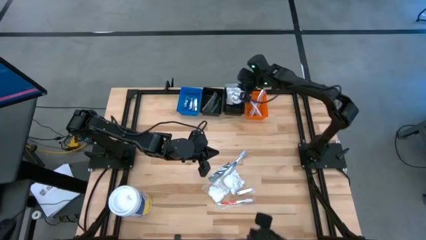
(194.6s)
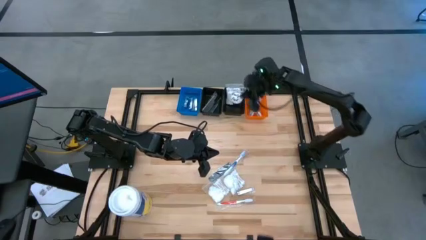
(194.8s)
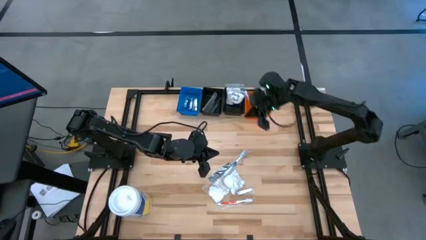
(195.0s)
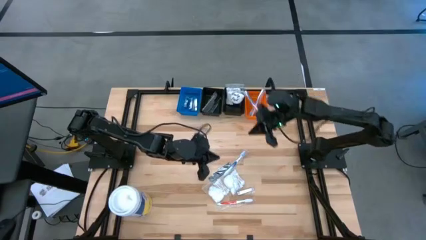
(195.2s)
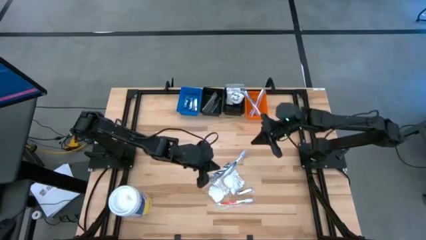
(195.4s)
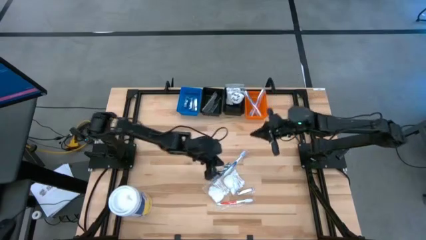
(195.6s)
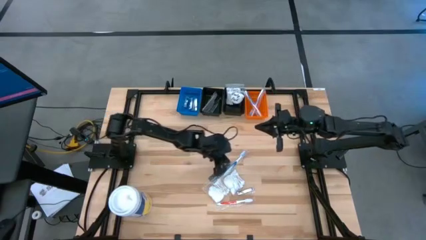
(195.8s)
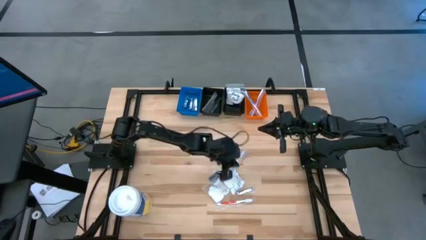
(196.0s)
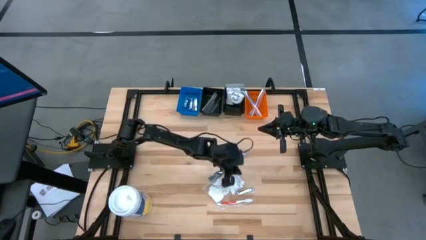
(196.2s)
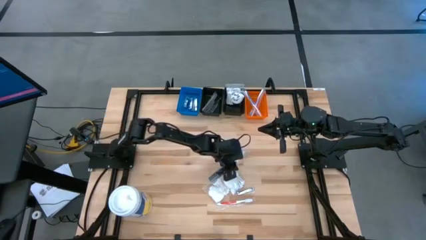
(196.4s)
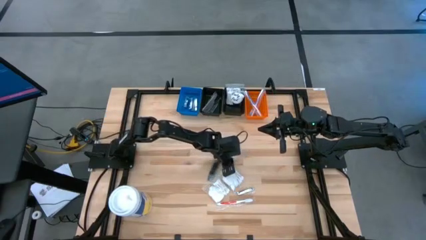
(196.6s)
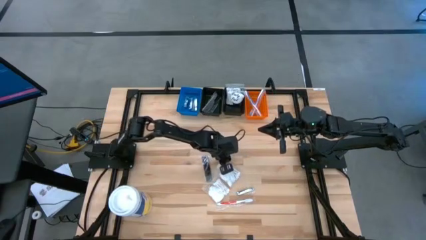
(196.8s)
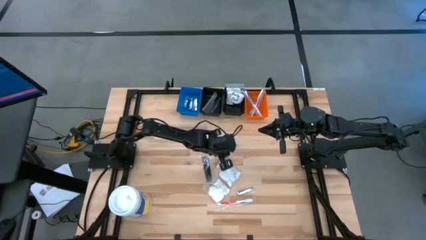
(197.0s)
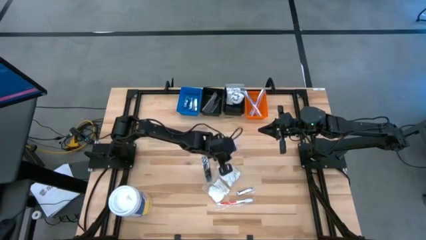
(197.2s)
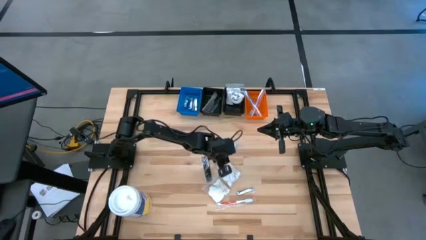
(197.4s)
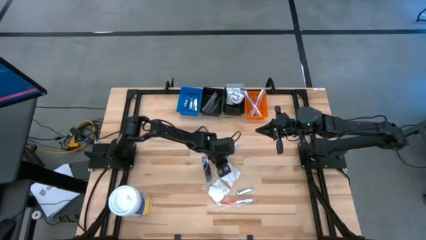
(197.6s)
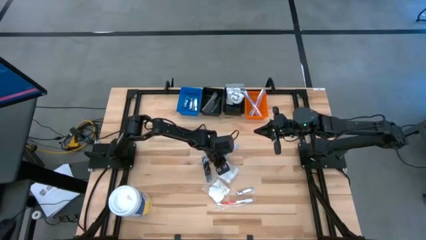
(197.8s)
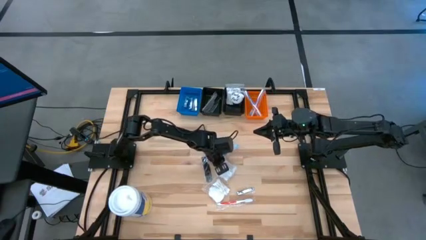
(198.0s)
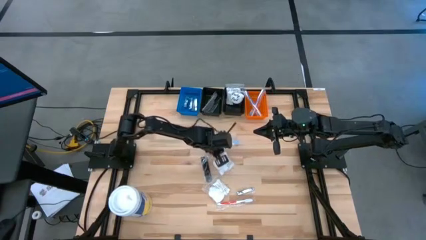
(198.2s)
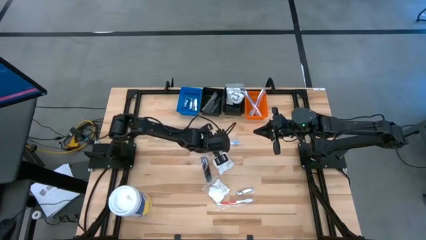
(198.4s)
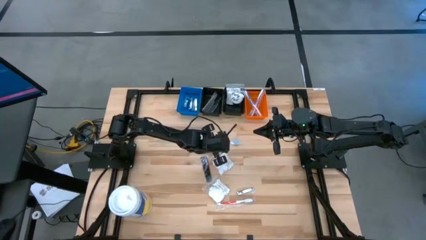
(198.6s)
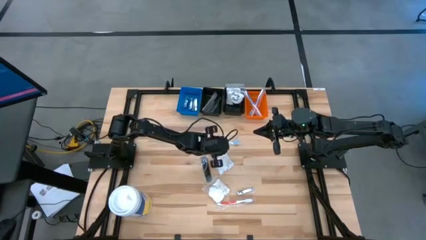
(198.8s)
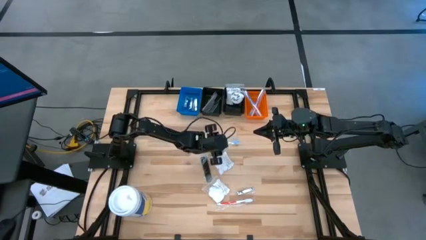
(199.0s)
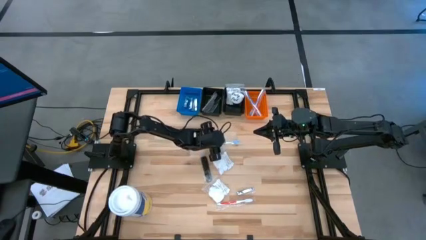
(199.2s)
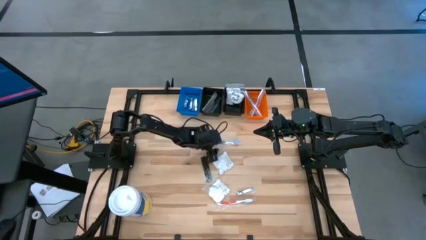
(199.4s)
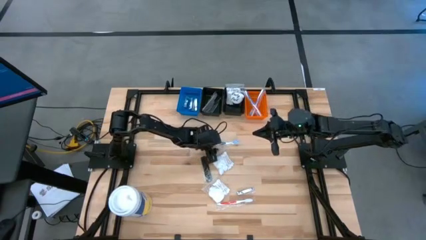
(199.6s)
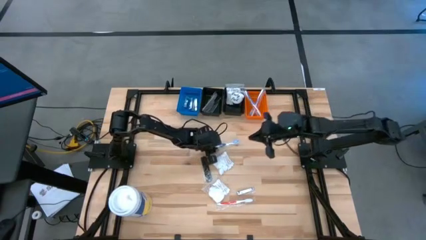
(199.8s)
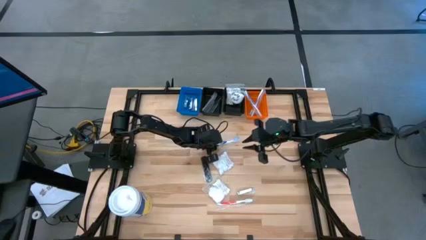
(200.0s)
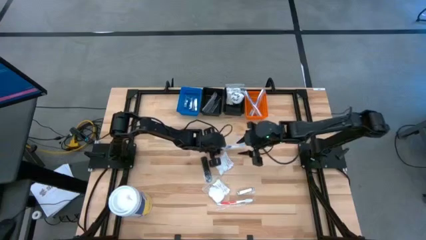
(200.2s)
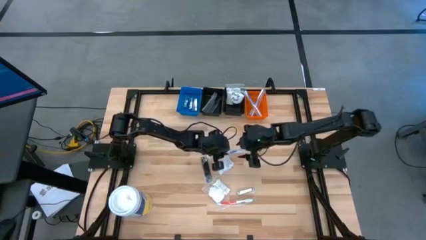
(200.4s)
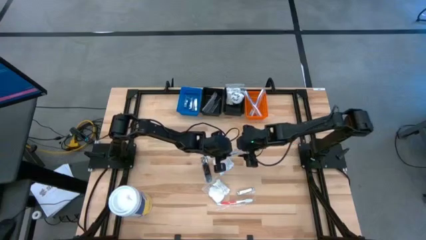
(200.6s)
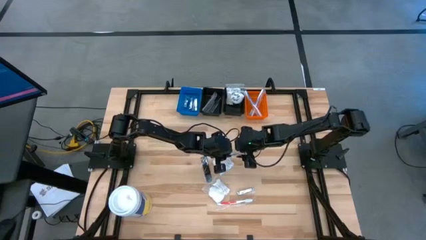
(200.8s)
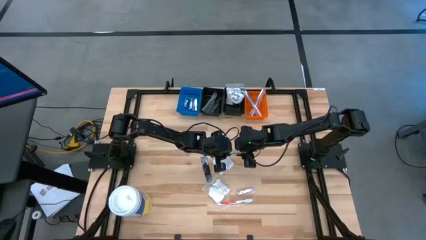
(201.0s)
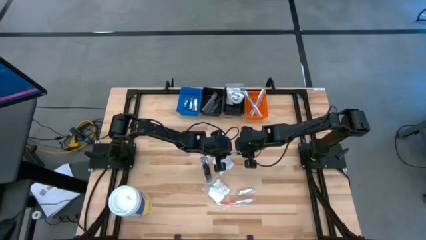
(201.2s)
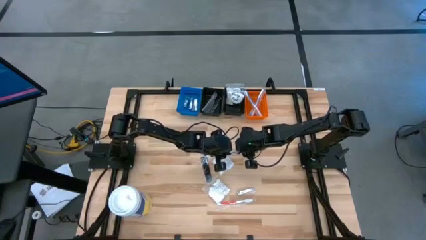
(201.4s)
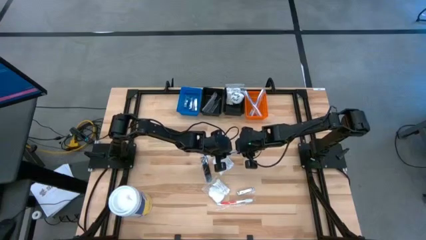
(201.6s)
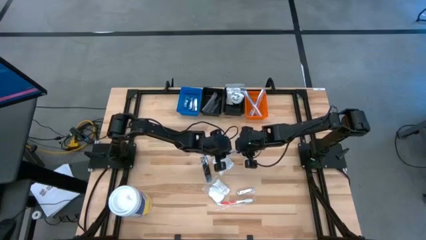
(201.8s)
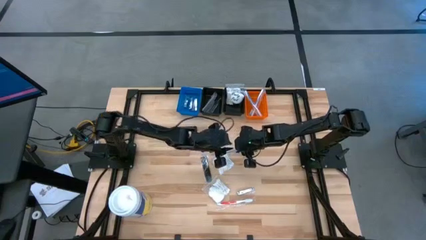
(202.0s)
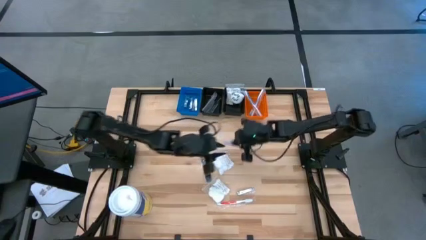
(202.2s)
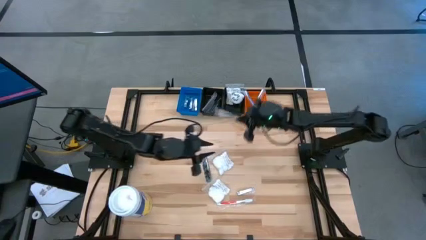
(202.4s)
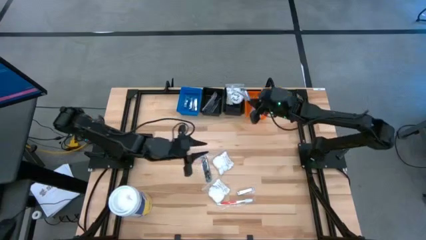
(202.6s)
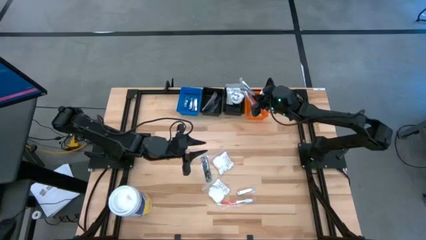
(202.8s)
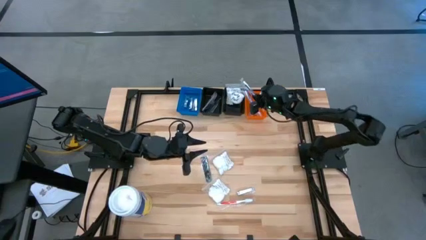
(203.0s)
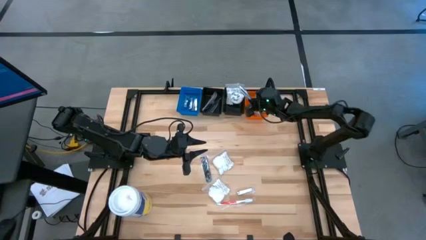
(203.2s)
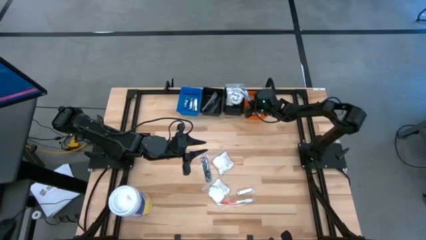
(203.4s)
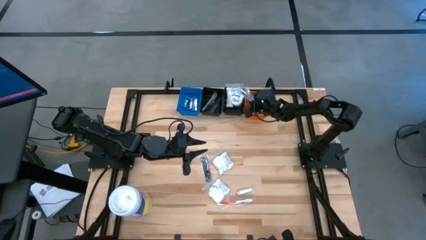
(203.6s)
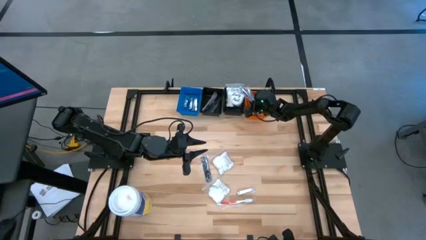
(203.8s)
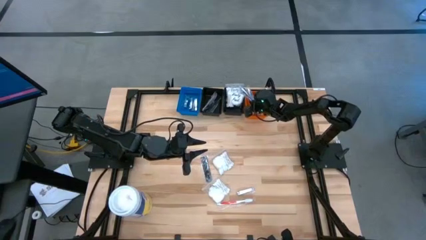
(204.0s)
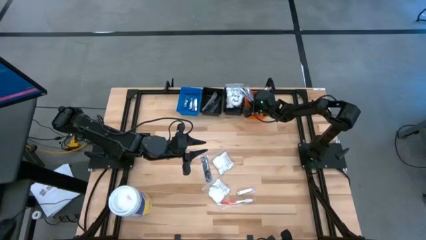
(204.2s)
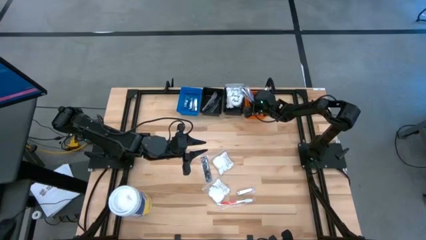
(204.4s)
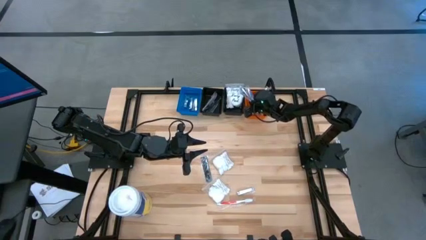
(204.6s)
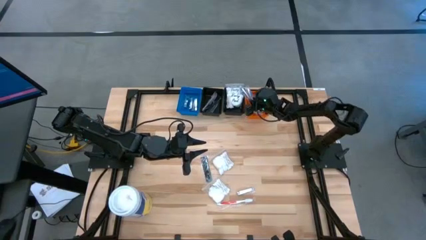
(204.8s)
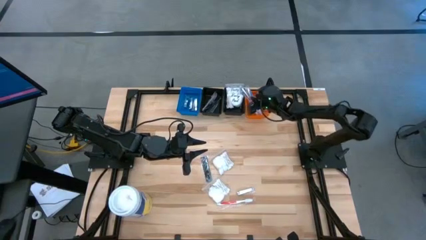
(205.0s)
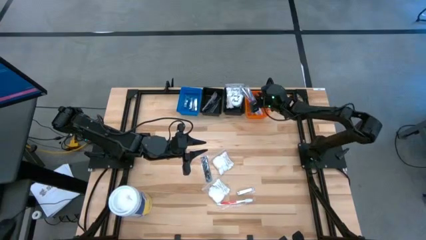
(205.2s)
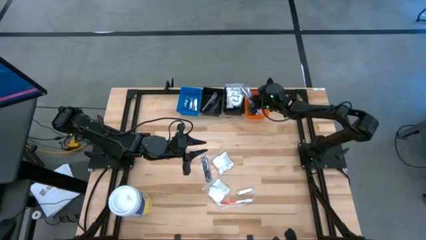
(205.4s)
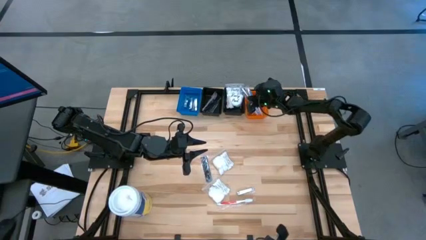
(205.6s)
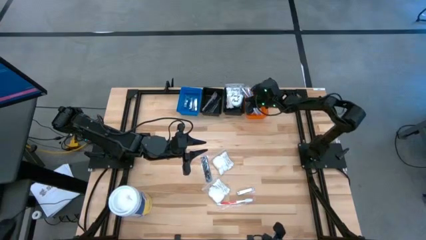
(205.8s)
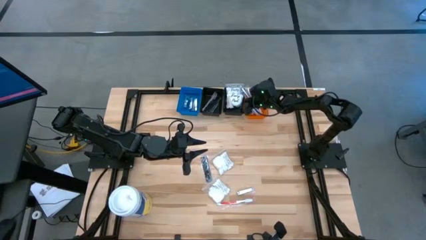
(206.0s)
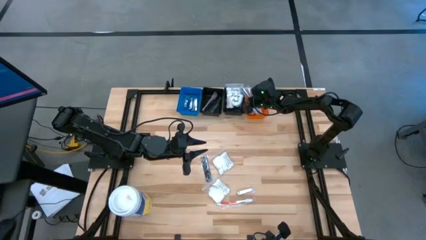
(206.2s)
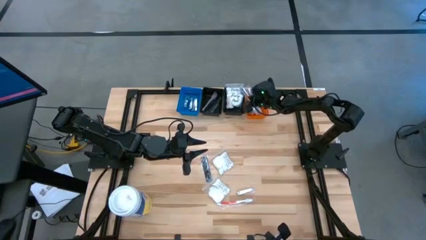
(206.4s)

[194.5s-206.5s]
Task: Pick & Place Travel size toiletries
Put the blue toothbrush into the orange bin

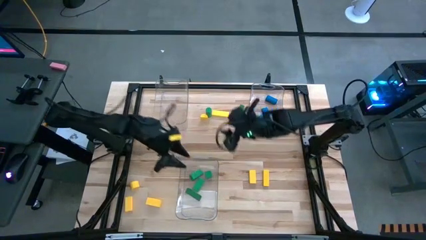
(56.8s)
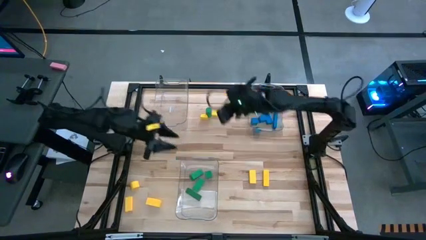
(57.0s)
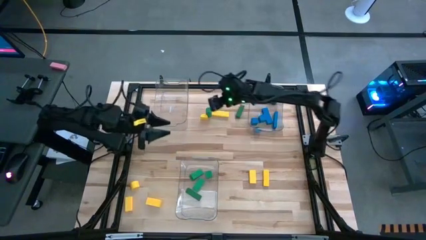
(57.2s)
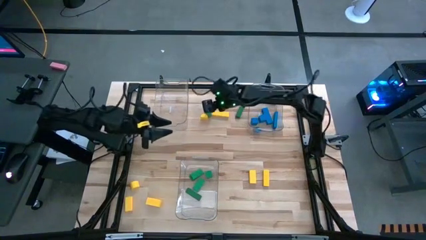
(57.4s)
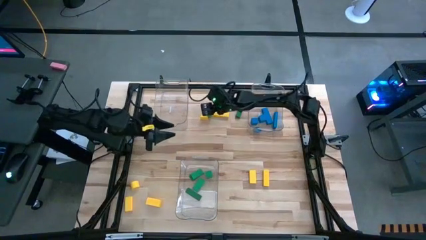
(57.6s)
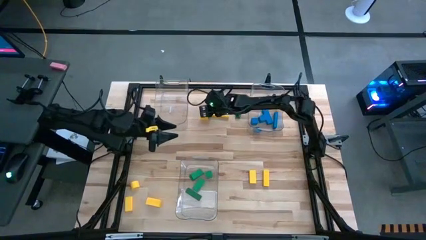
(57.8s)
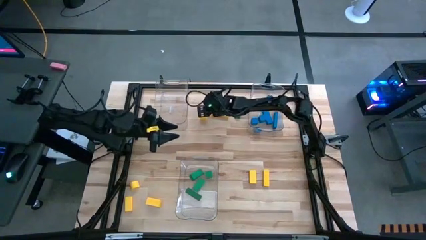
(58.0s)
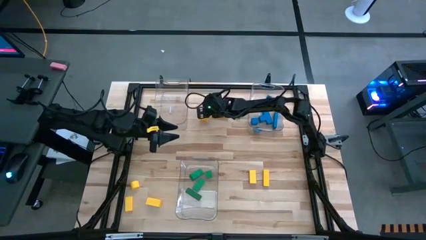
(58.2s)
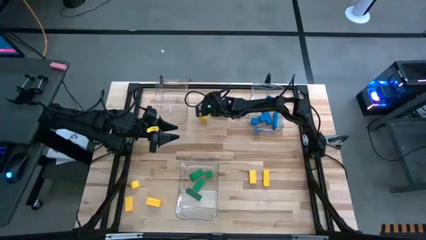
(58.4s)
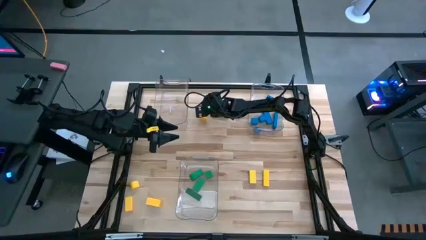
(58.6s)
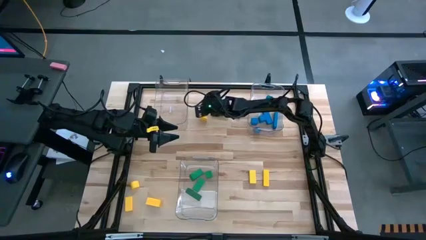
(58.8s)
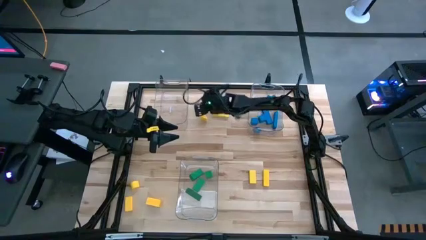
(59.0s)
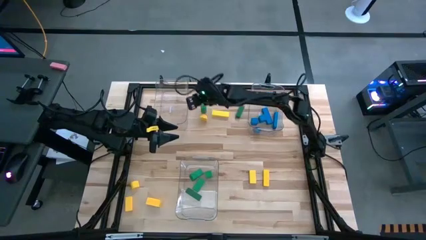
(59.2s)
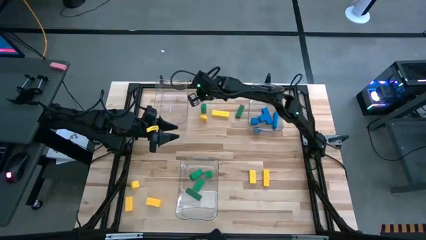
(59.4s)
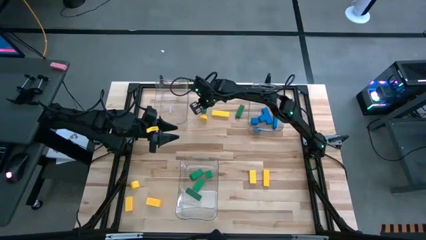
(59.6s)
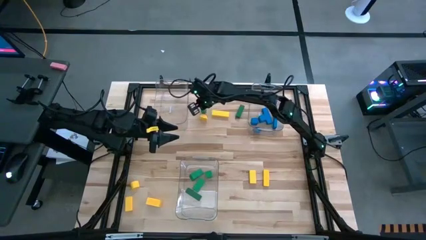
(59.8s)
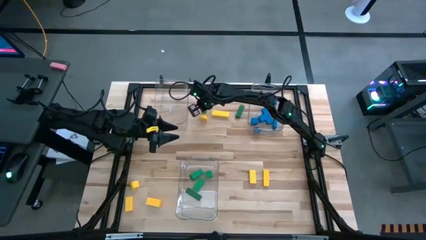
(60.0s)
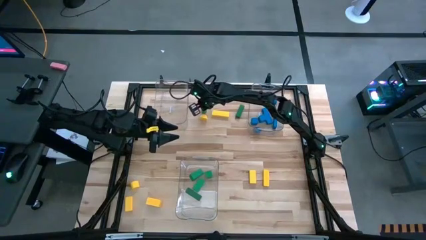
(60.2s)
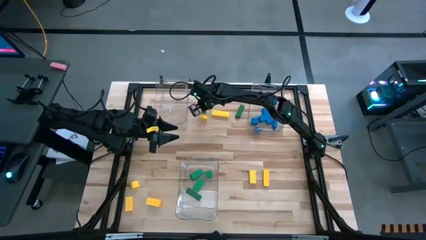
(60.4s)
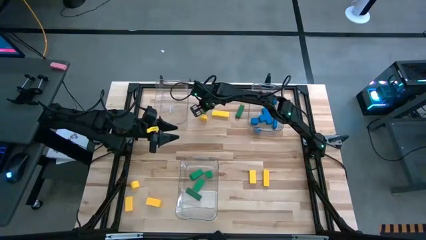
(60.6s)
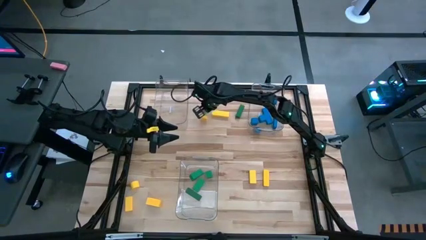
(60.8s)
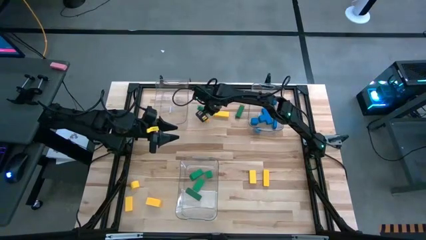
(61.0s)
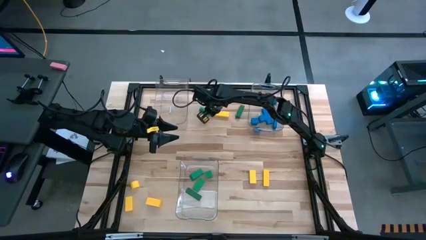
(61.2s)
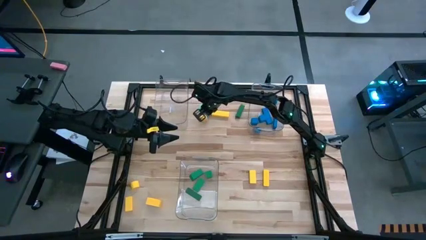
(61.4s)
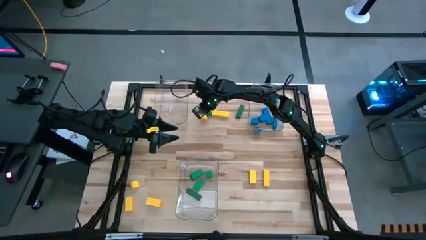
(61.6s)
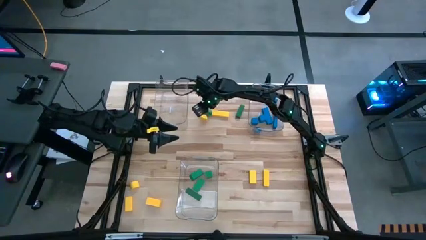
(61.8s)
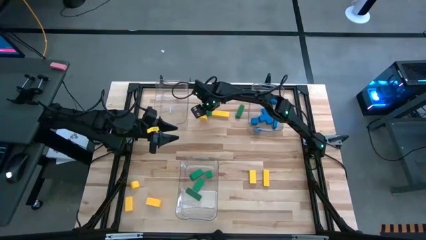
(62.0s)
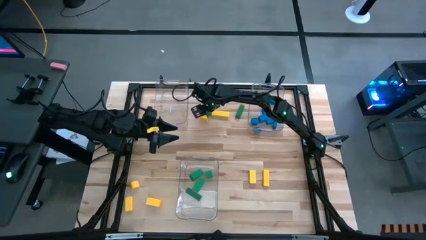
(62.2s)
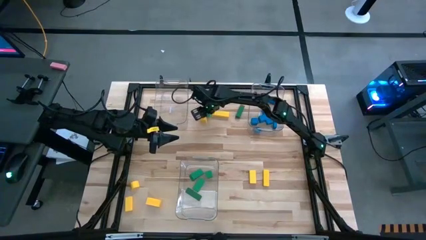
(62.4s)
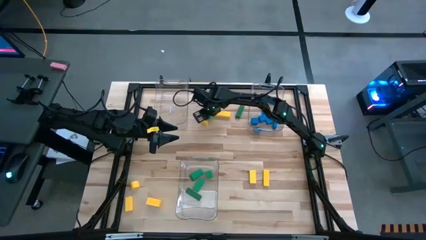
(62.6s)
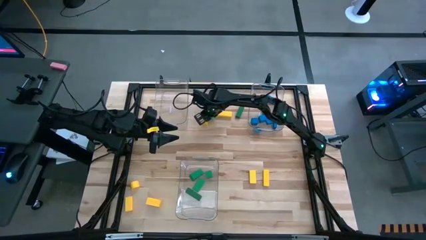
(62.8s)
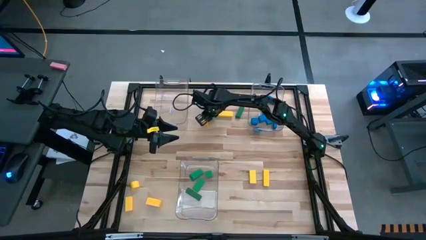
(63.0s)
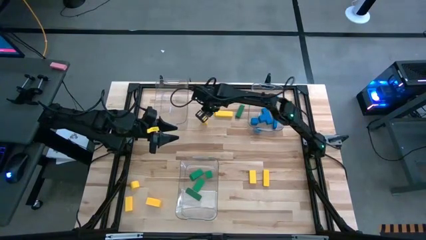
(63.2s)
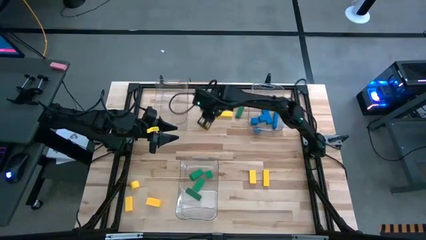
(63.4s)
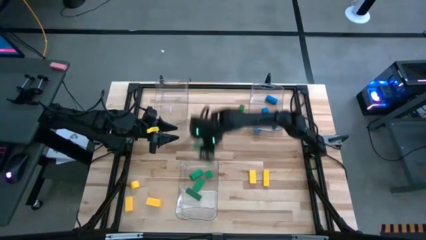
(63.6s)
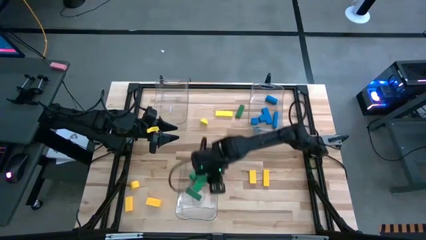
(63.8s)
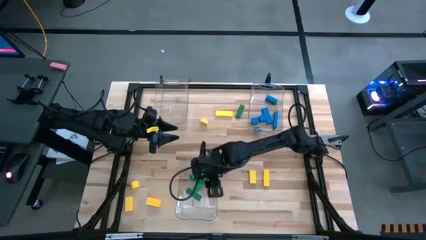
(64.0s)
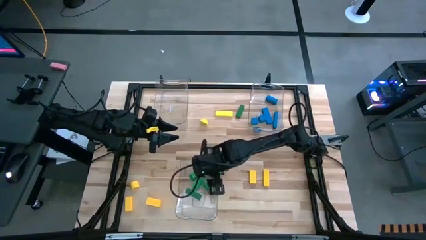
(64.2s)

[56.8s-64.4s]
Task: Sort blocks
Put the green block into the bottom transparent bin
